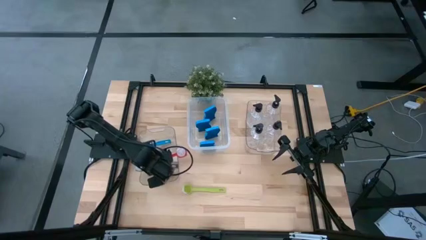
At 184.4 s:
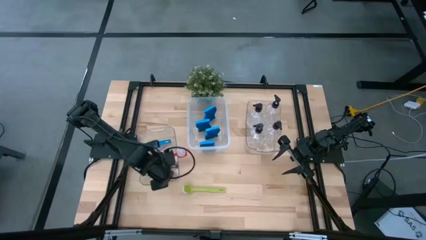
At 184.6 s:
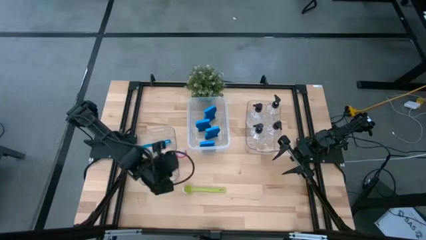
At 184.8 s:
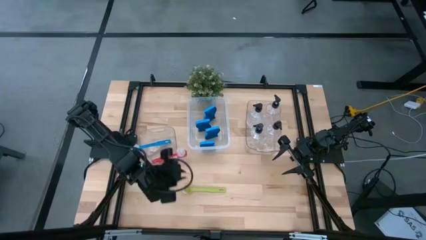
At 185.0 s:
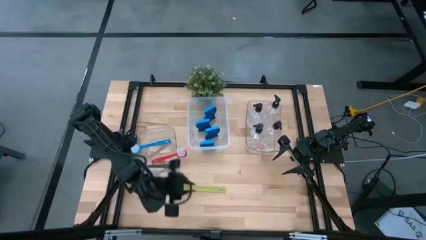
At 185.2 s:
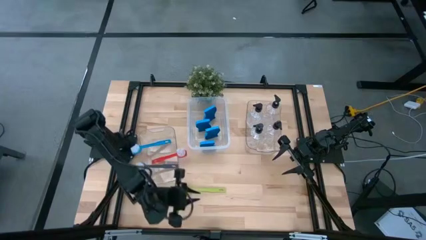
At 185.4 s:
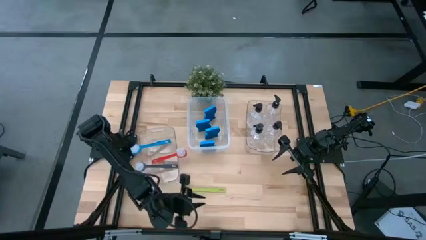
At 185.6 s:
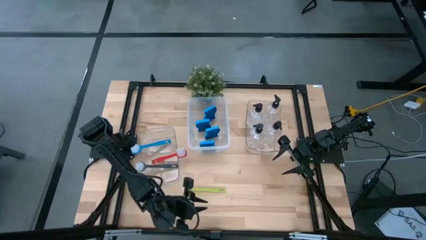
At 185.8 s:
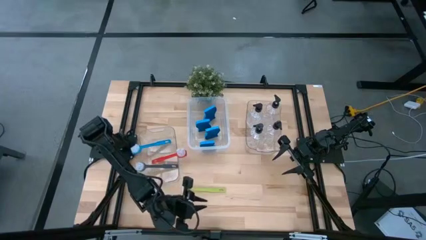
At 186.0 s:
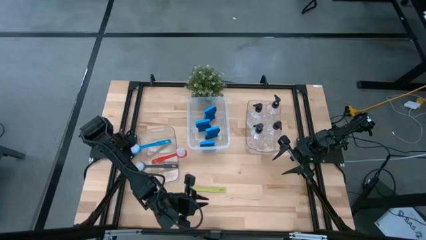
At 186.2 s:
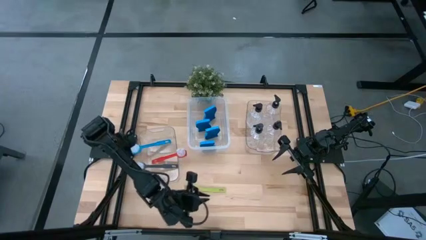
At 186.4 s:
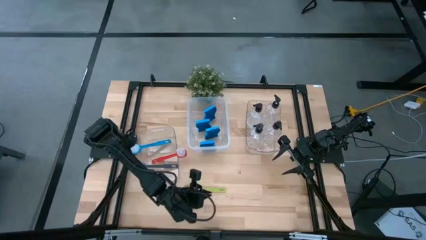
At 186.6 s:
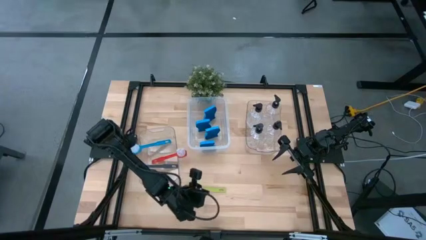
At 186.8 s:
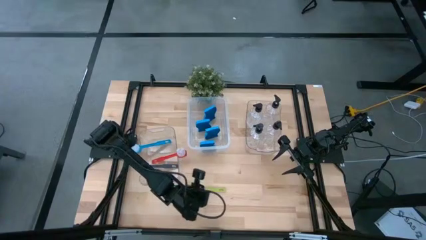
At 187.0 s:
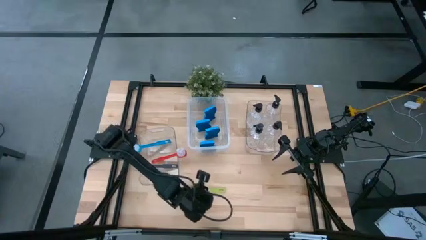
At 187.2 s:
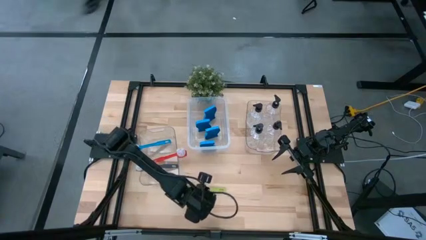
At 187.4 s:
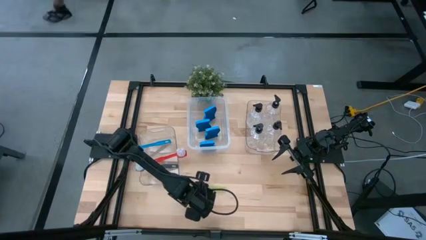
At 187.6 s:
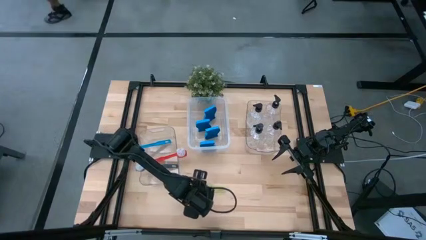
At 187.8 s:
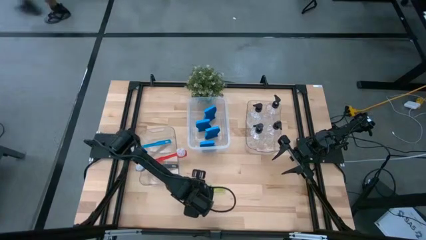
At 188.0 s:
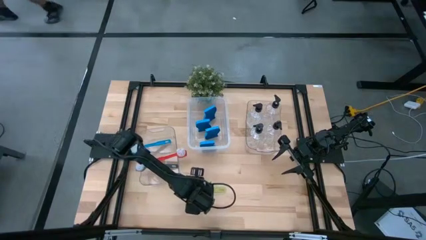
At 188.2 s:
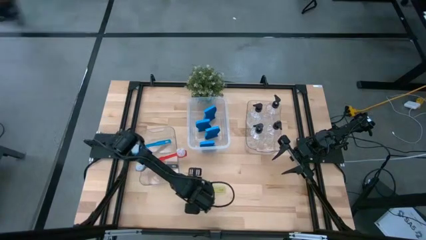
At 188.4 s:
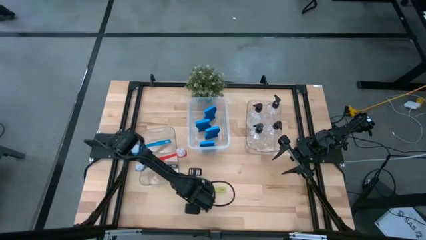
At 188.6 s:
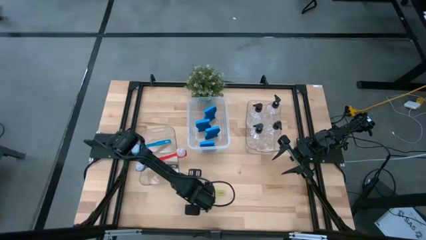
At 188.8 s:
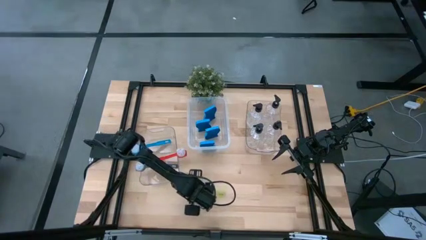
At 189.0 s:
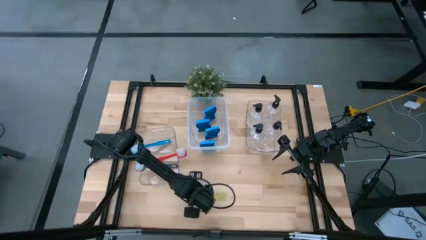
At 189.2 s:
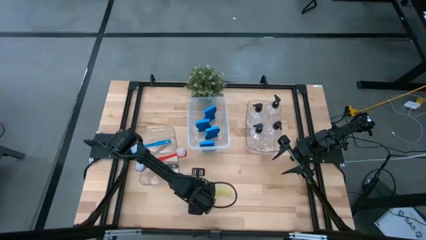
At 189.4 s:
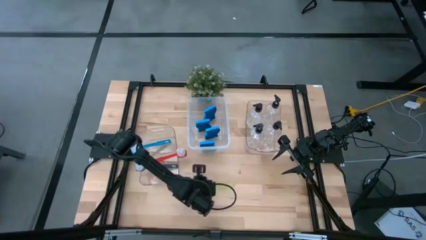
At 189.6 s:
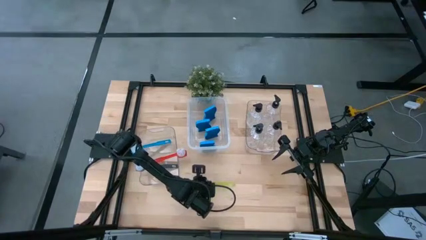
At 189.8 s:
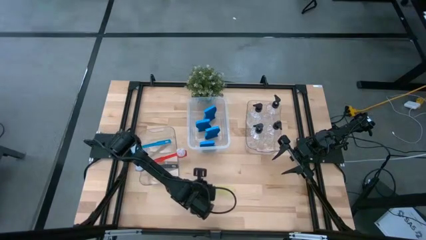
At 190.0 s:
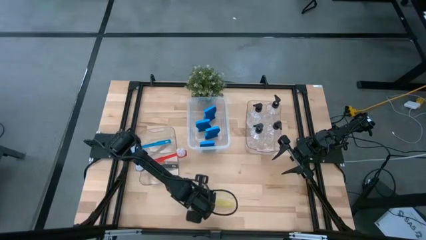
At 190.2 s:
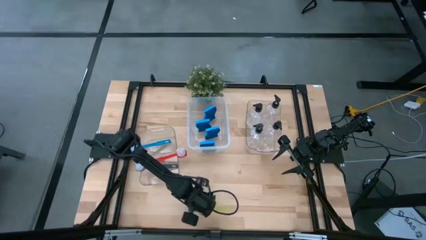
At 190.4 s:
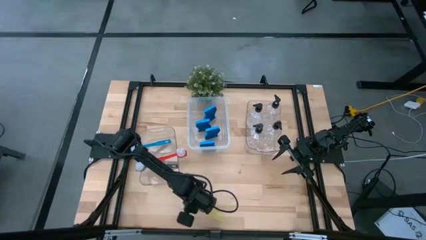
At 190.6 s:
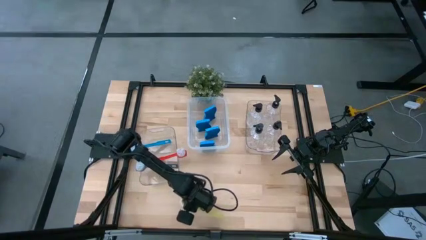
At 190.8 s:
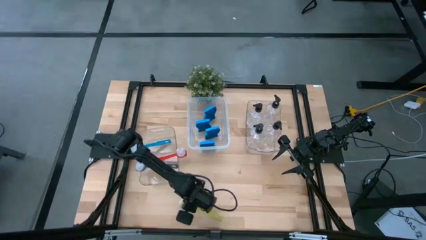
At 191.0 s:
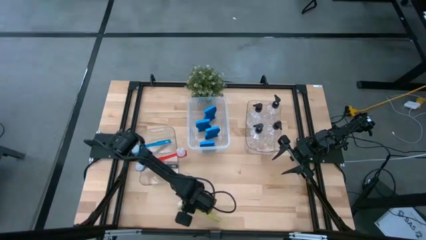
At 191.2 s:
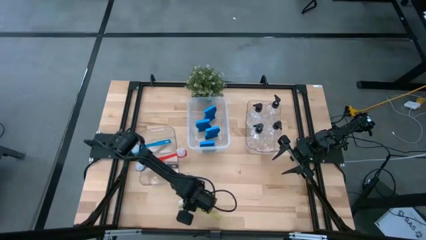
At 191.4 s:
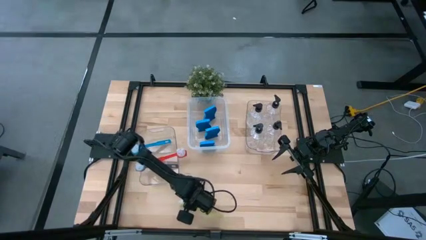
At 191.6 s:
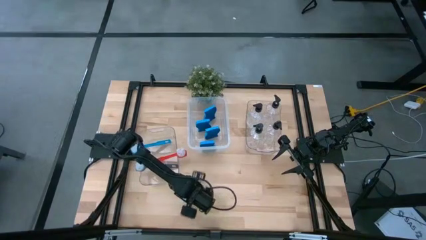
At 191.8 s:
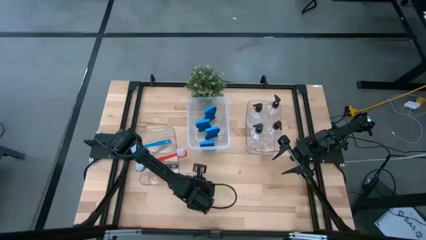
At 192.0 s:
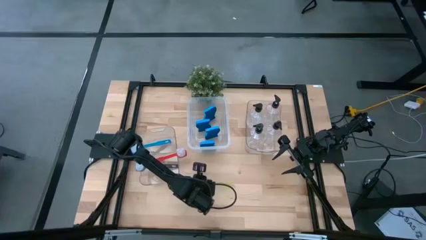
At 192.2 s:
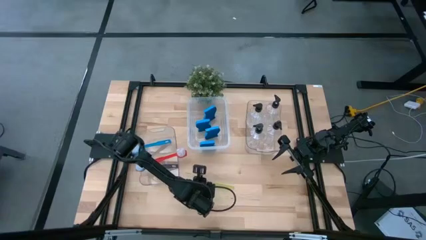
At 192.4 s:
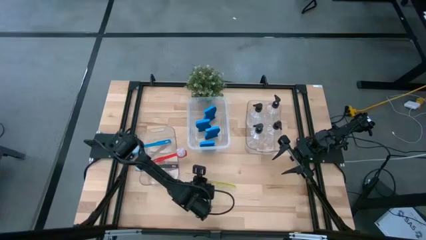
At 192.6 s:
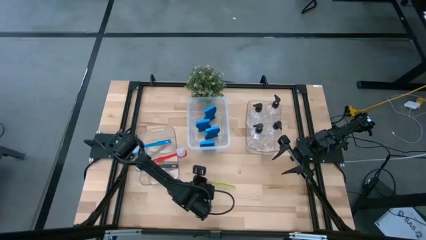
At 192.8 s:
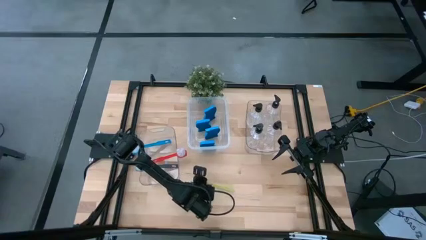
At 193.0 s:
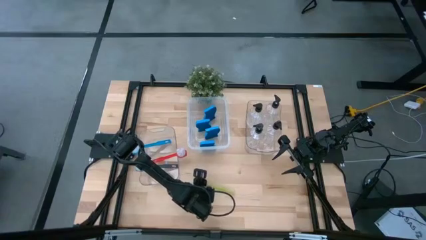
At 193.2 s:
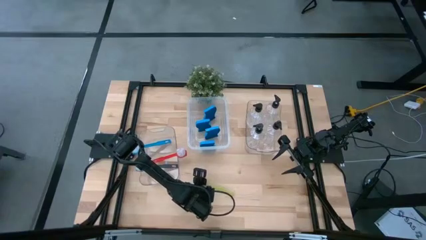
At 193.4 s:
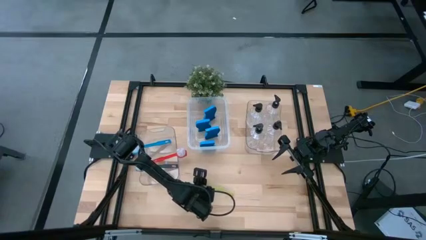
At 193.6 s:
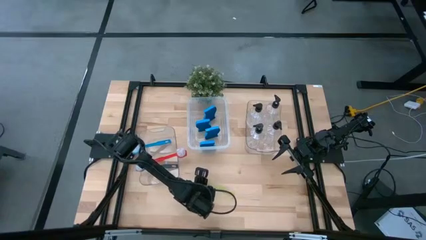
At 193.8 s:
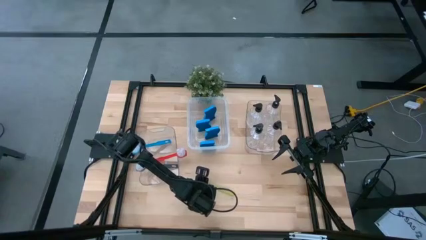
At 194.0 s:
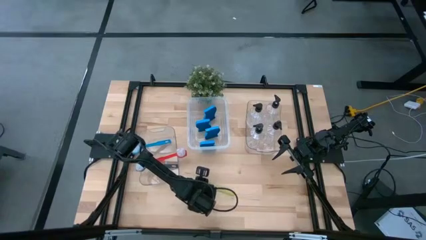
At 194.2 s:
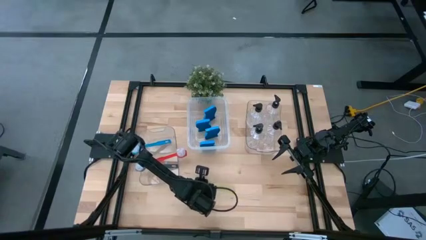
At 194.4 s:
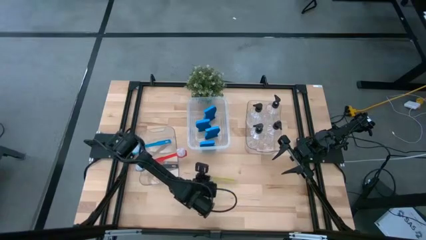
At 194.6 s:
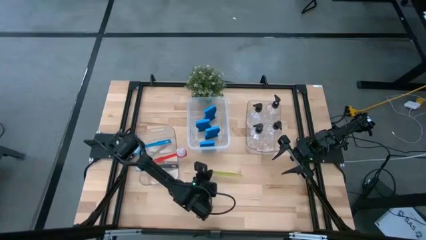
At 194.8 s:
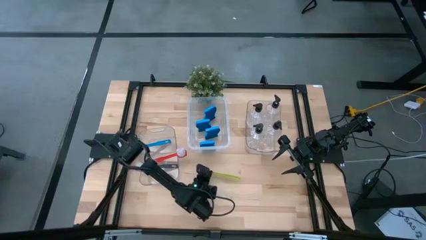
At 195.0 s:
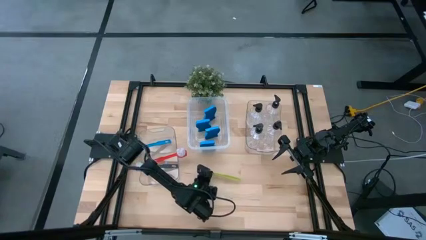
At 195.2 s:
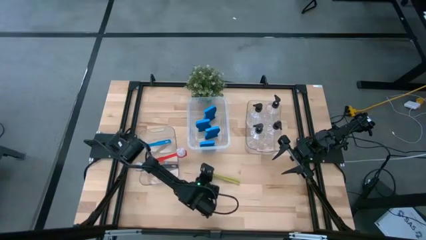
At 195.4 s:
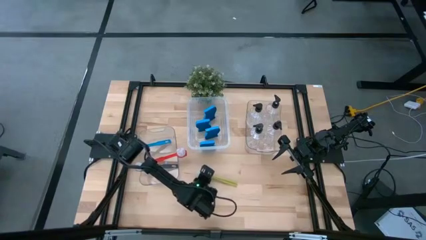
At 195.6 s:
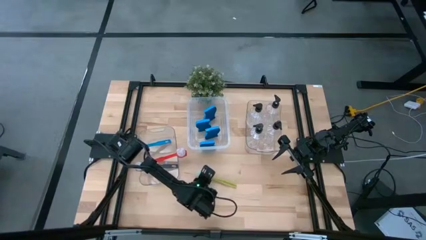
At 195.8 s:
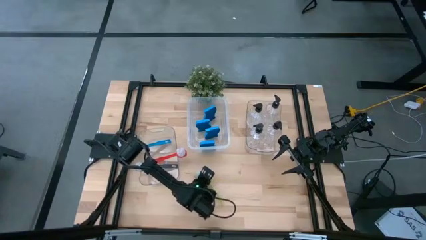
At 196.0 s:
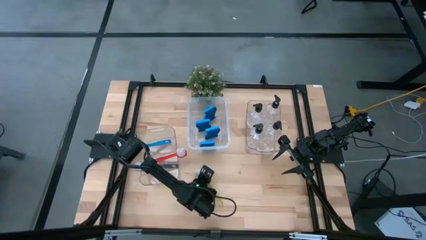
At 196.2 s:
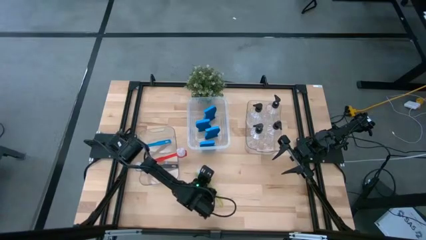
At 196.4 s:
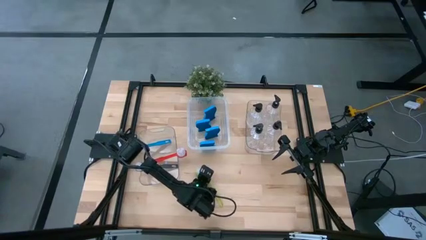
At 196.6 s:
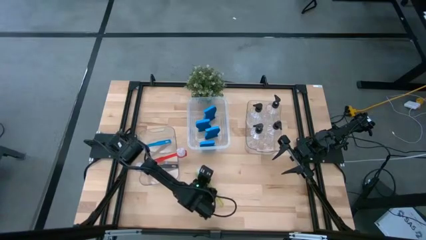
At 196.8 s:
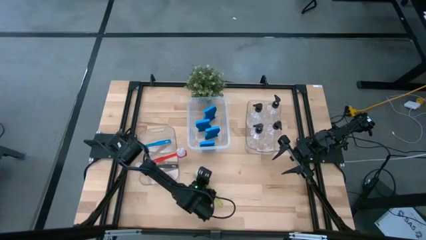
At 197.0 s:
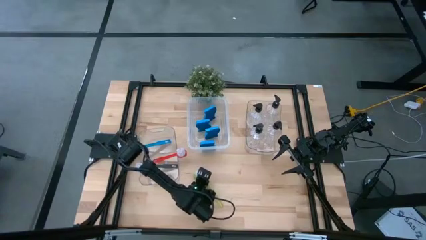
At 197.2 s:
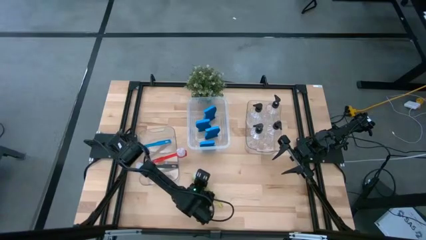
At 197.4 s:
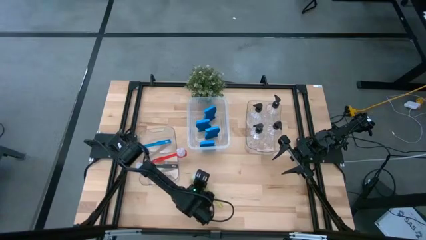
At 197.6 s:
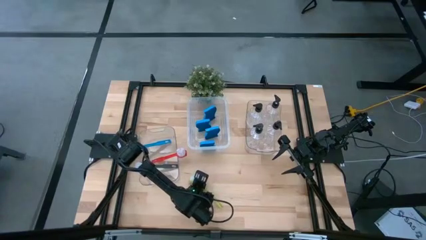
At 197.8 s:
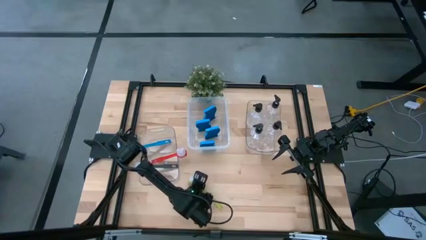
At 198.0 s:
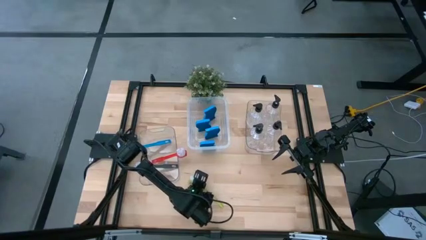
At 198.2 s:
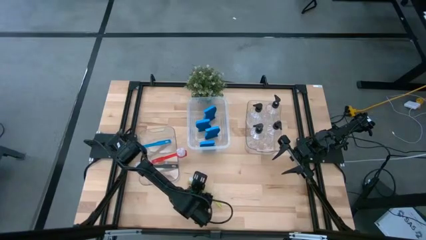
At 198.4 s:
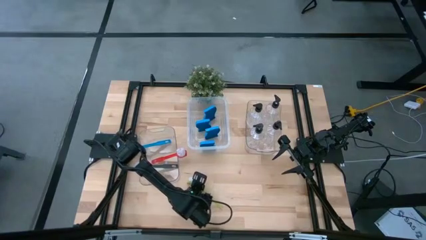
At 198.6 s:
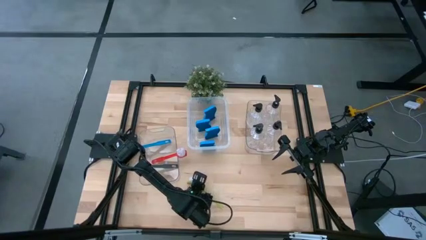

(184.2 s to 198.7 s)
Task: Pick & Place Kitchen Sink Supplies
Put the green brush into the left transparent bin
